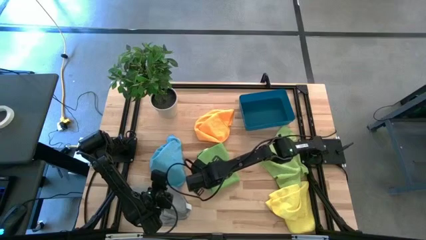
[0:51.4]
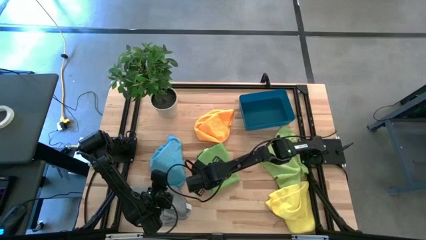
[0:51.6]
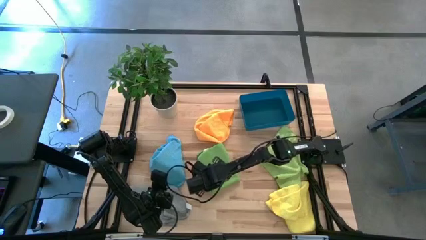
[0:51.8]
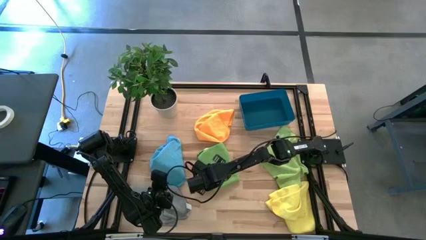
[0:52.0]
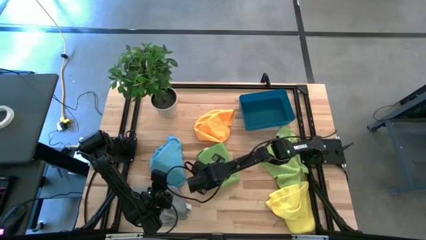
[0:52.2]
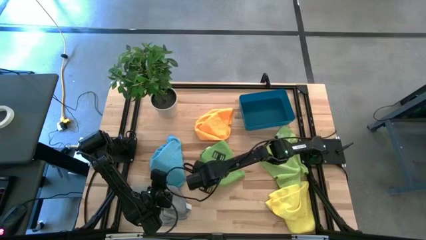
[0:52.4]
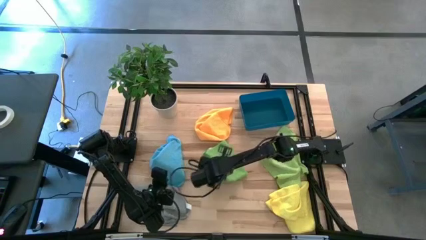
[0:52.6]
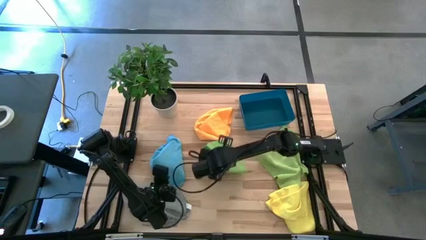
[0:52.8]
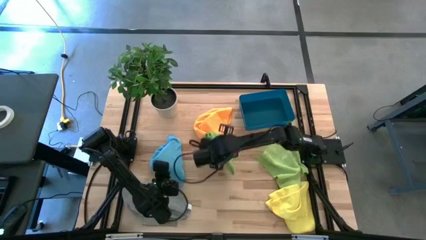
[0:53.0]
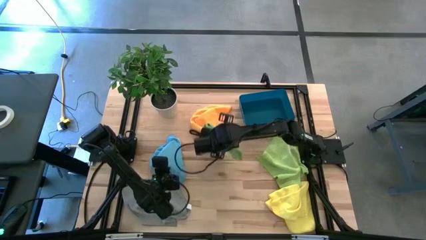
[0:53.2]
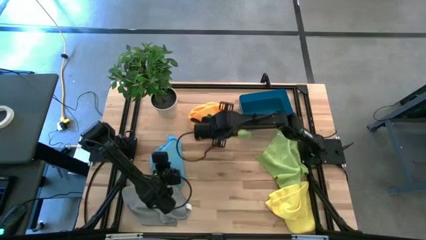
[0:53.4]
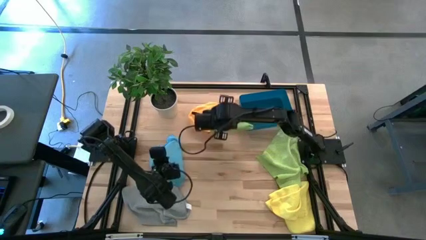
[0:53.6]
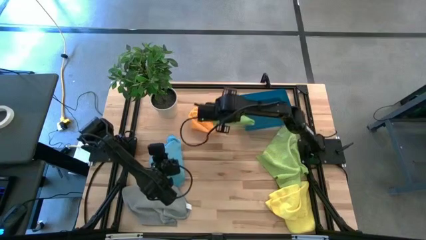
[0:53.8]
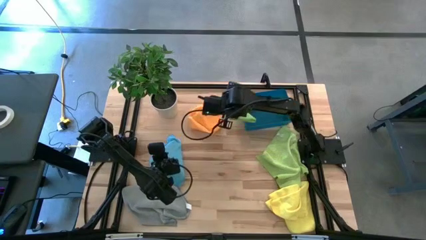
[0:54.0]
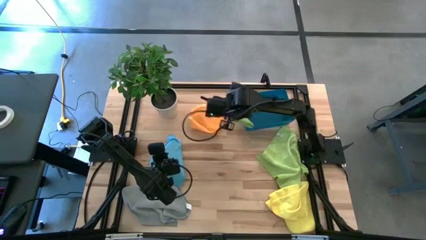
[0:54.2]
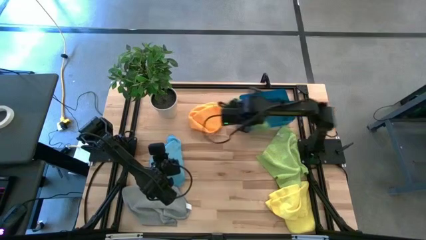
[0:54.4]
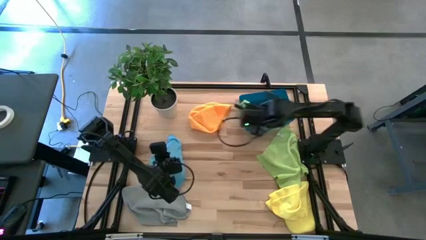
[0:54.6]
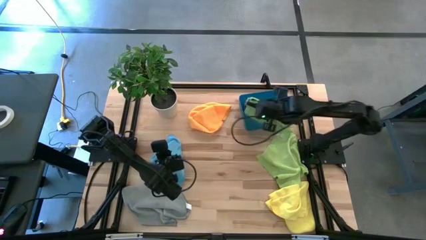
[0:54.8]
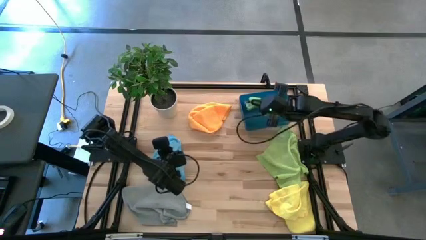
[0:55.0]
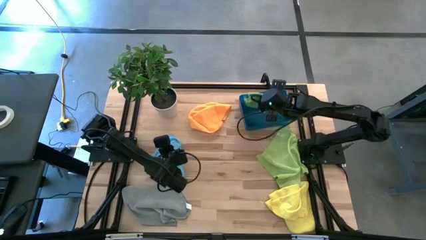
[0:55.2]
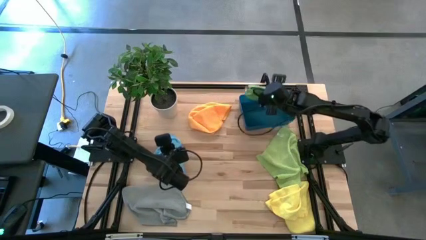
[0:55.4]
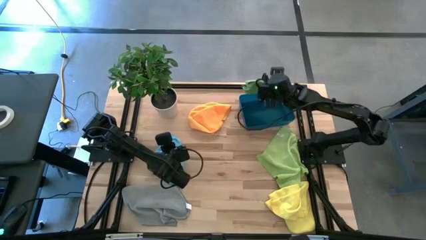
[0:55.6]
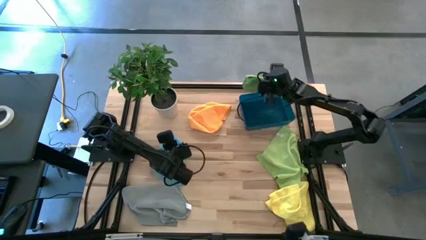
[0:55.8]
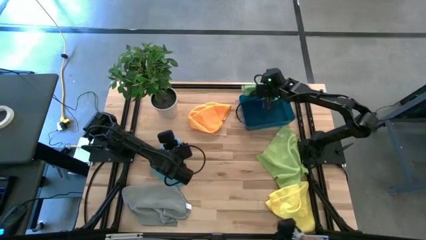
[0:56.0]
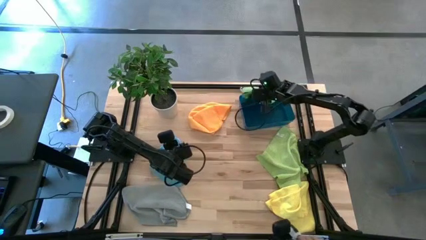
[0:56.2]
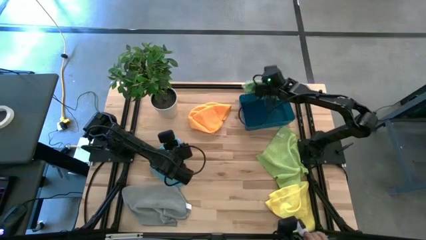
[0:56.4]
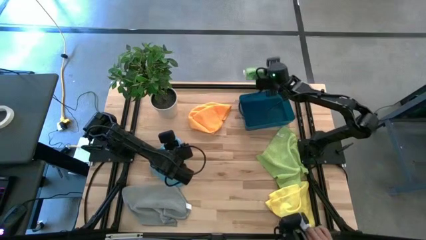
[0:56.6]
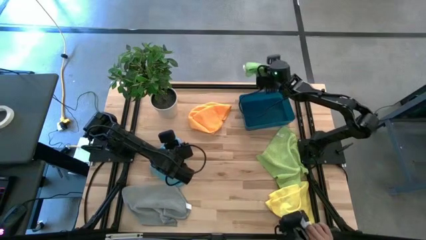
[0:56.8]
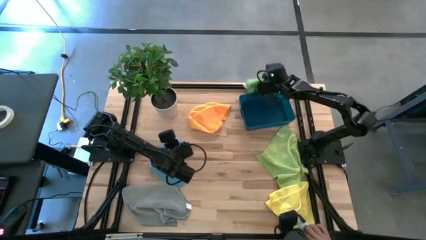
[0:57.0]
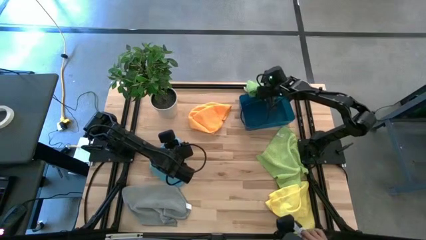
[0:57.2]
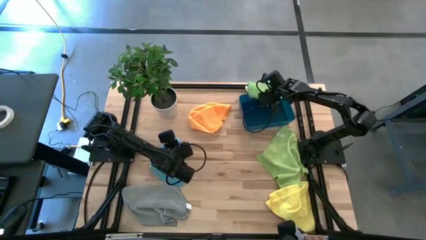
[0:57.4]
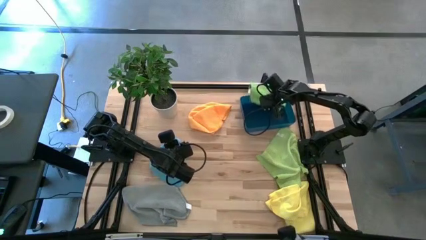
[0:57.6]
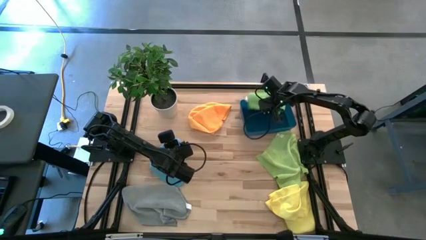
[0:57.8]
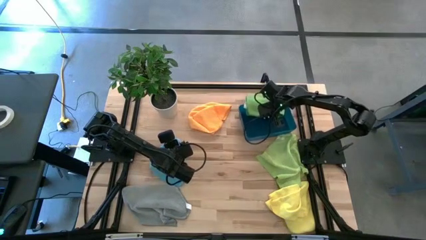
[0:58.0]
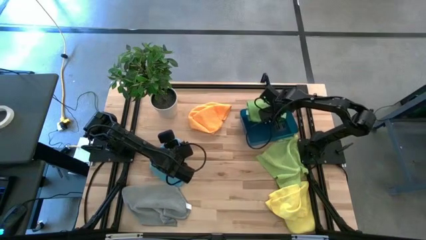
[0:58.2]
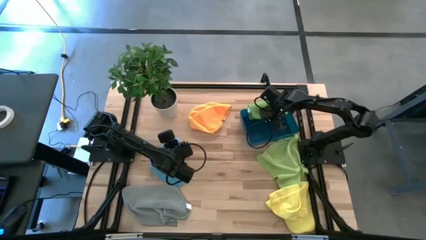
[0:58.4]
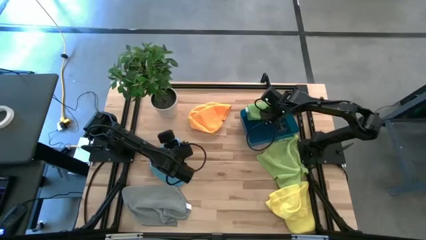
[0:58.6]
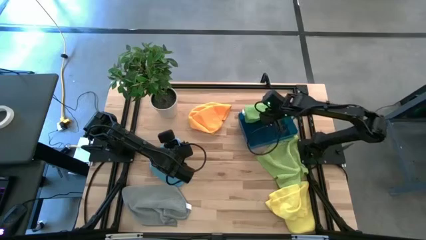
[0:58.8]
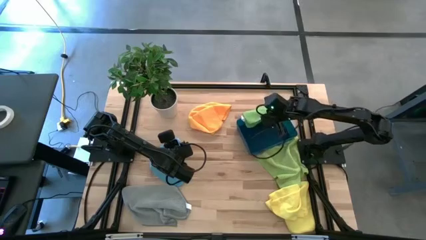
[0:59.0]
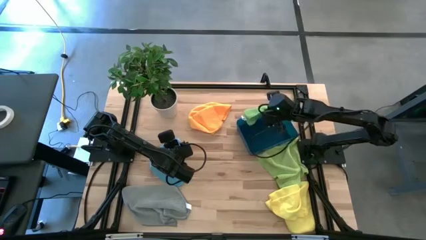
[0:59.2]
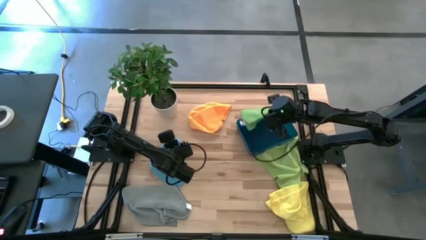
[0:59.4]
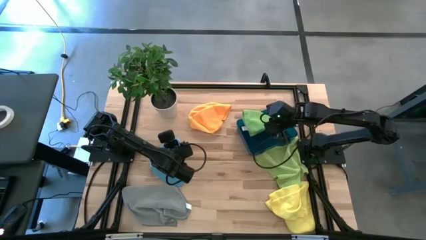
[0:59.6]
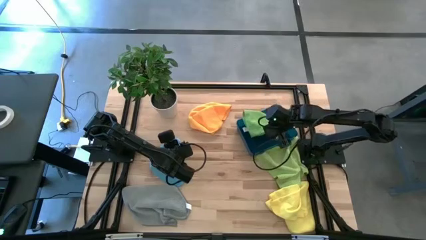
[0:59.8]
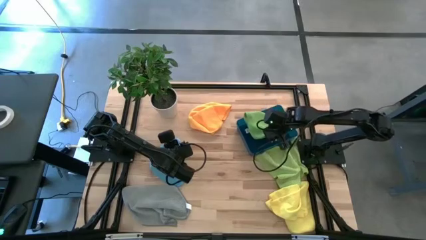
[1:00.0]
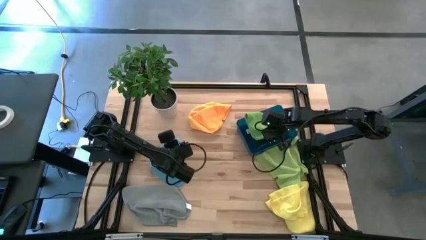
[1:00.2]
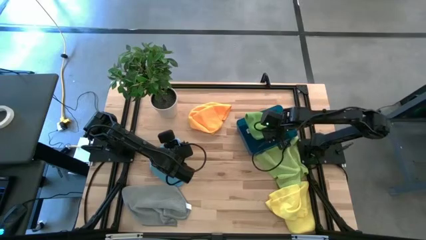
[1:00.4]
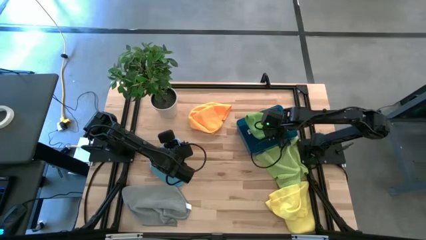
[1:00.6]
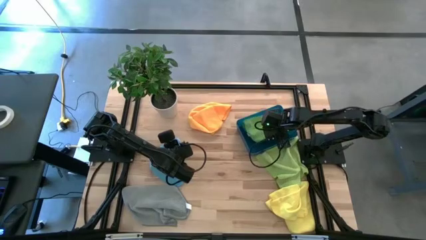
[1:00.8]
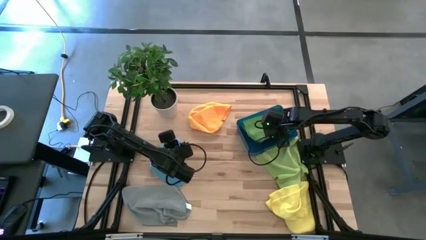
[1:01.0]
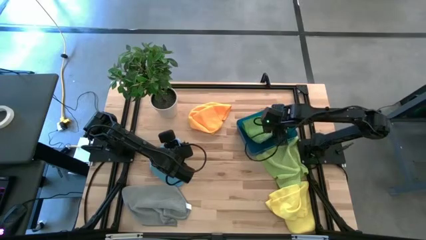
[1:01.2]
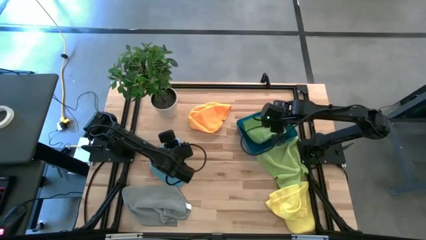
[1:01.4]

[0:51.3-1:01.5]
Task: Fold microfiber towels
Put the green microfiber cloth into the blue bin

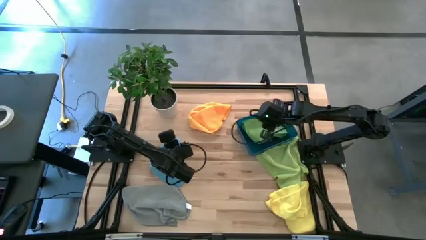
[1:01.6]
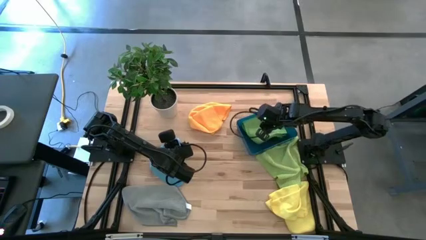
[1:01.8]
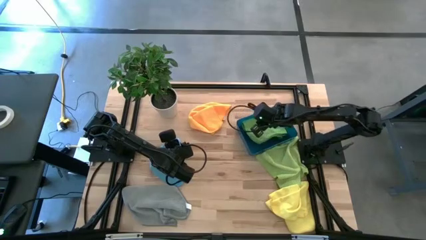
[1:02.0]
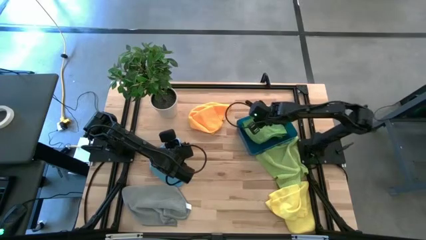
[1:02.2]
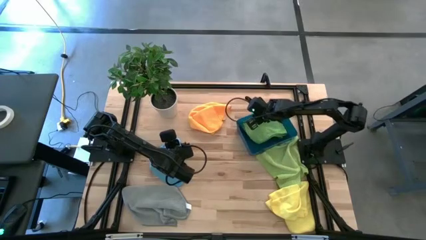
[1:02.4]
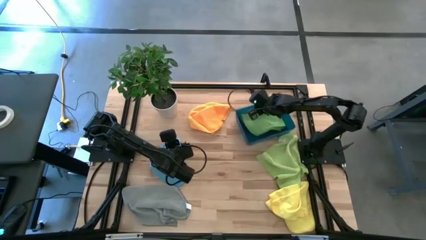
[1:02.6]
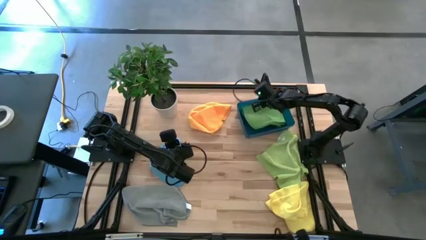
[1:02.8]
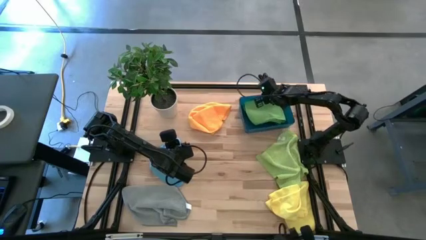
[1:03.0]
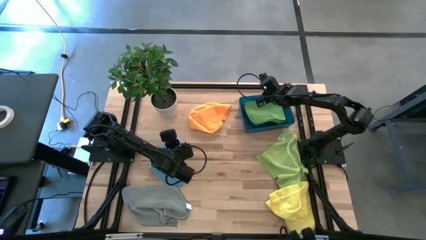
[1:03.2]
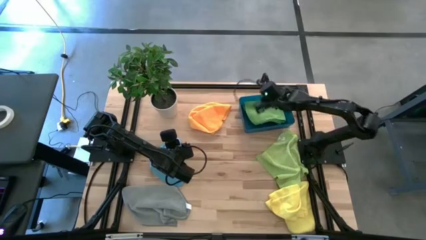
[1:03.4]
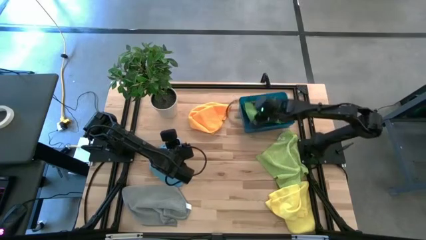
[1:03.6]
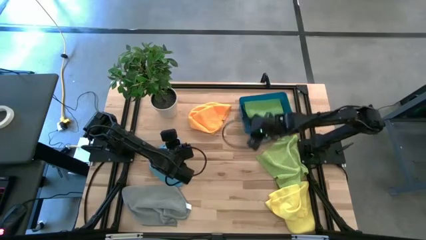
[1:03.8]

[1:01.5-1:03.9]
Adjust the blue bin

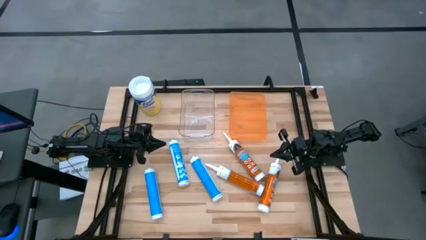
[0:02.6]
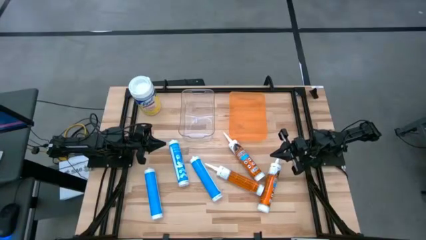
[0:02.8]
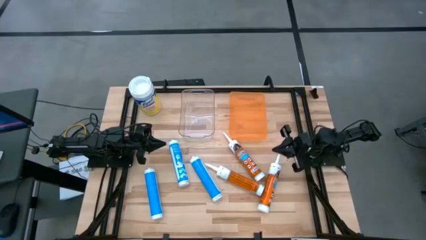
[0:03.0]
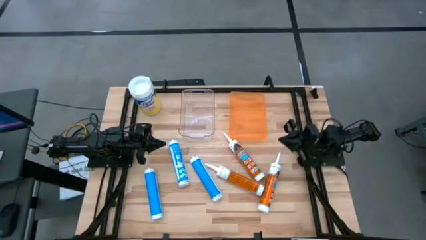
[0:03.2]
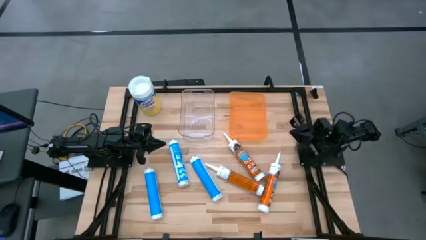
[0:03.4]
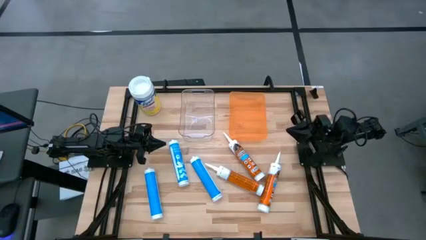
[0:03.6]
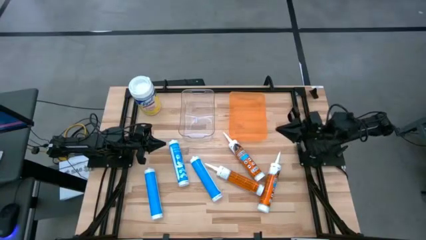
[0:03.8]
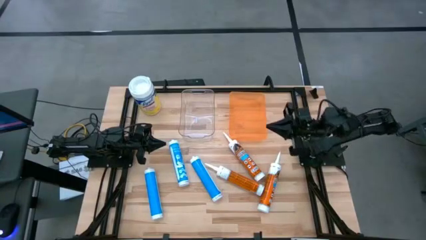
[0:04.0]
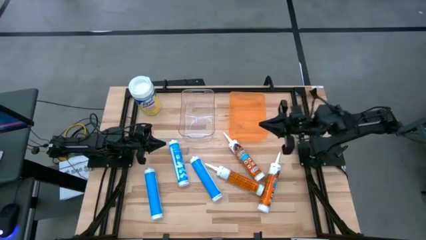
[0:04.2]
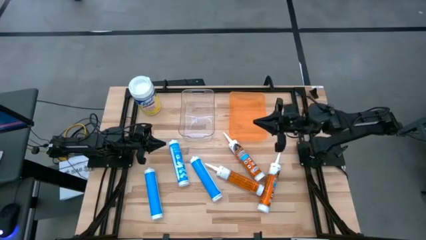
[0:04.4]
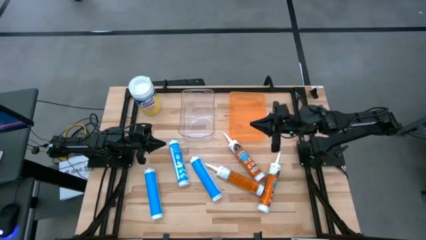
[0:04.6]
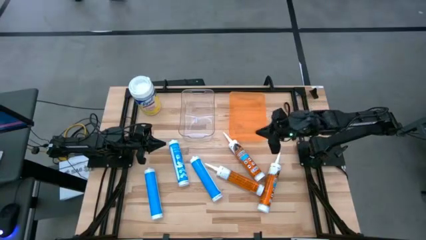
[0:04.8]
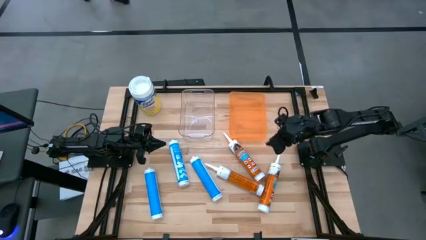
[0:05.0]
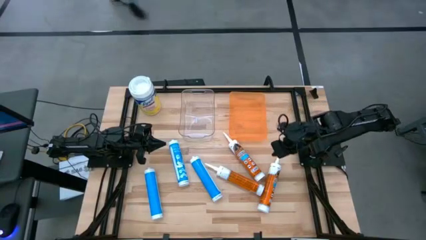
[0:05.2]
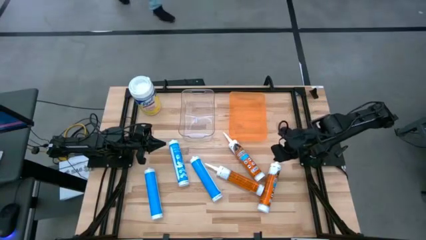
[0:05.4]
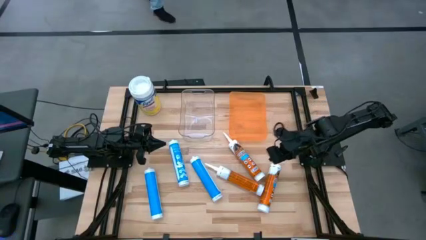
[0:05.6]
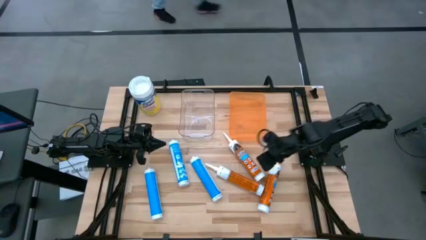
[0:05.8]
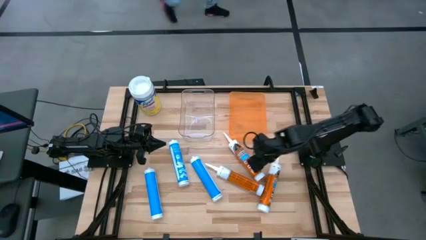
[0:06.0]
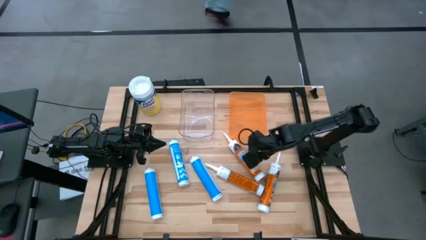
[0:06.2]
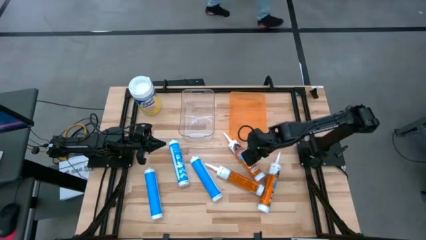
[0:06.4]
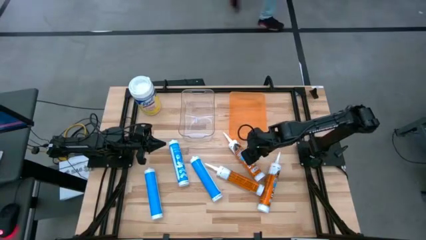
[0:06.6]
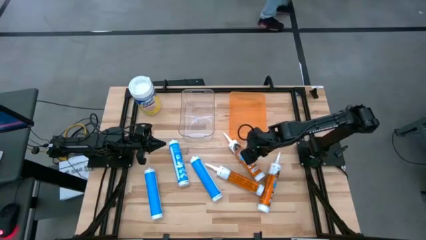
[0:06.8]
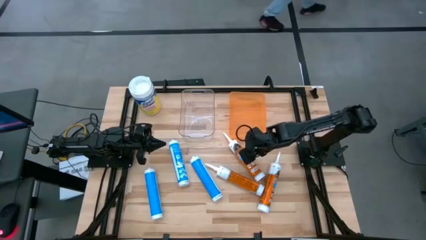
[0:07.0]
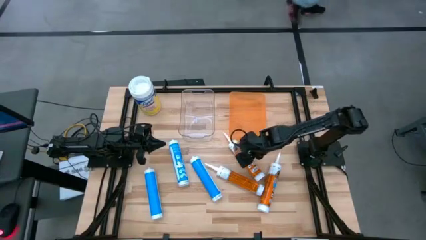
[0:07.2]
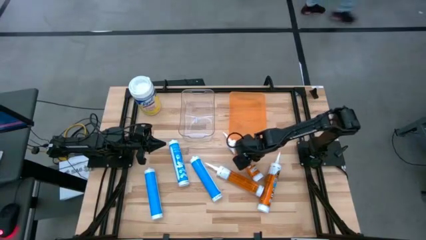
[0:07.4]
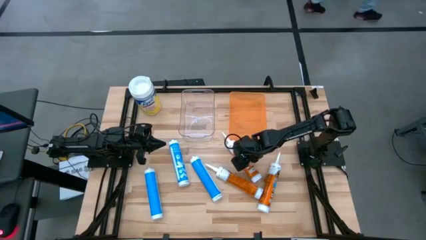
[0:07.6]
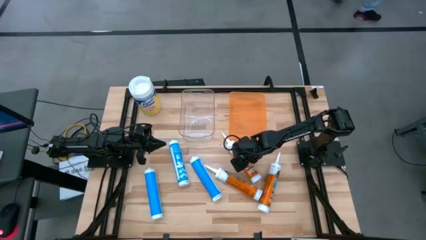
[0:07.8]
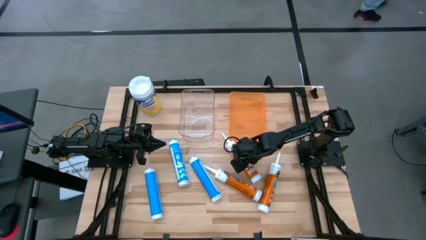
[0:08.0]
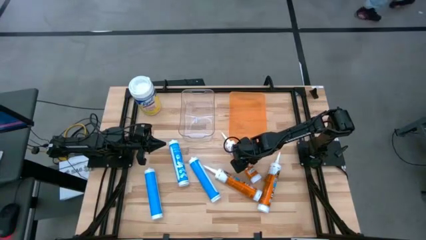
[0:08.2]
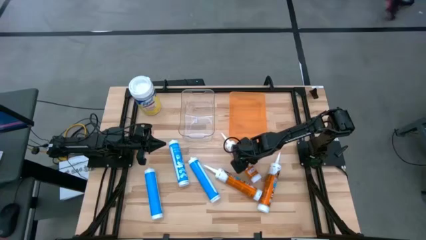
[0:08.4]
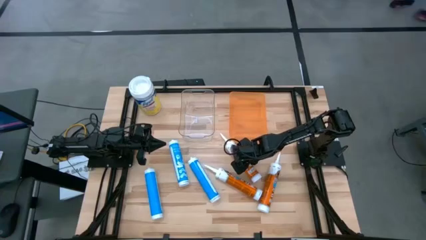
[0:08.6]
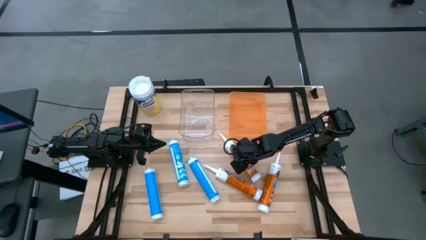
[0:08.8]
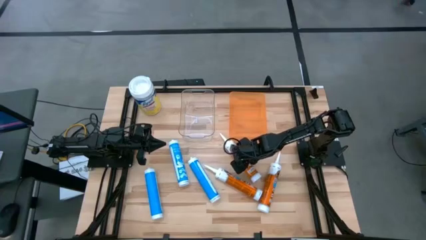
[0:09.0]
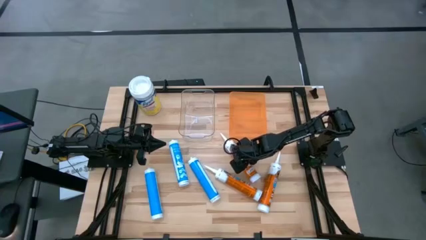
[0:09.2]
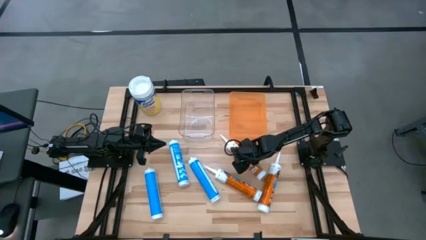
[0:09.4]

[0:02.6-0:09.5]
Task: Pick & place silicon tubes, Sealant and Lysol wipes
Put the middle orange sealant into the orange bin
